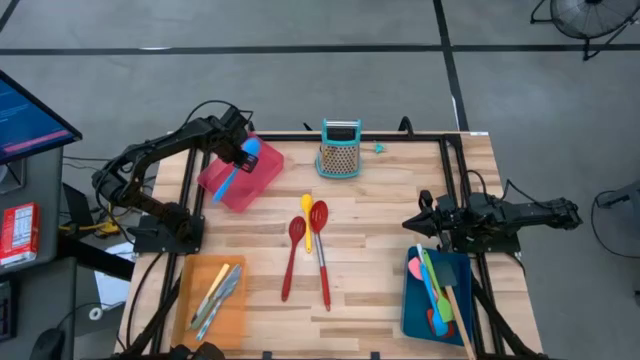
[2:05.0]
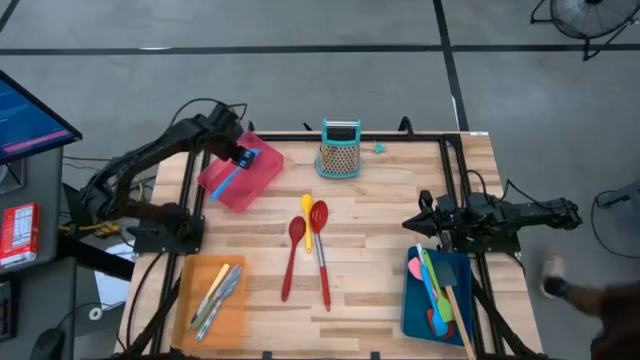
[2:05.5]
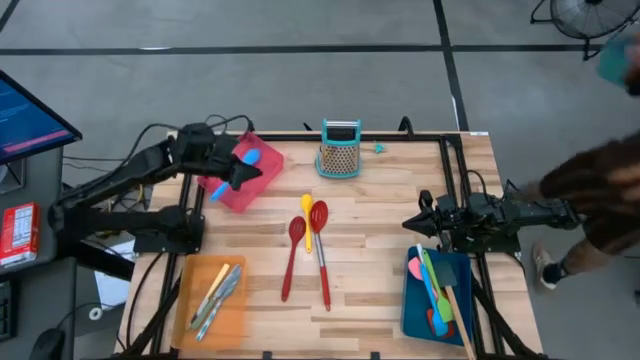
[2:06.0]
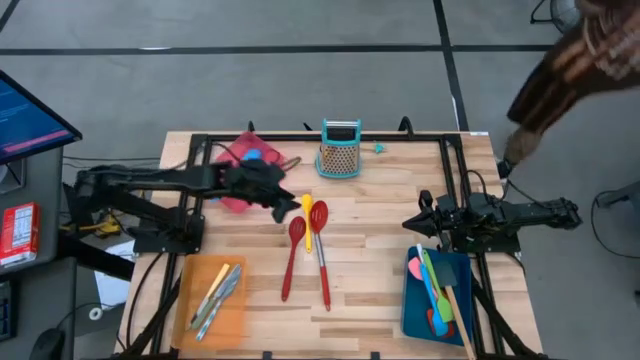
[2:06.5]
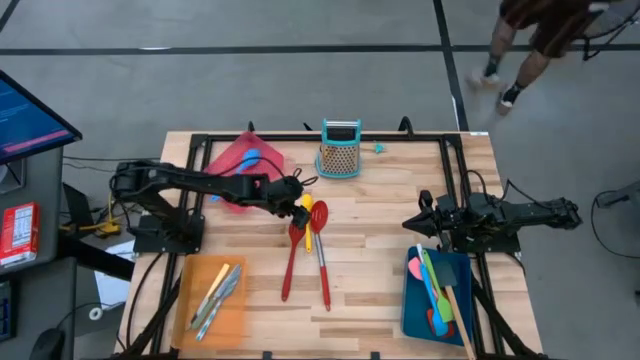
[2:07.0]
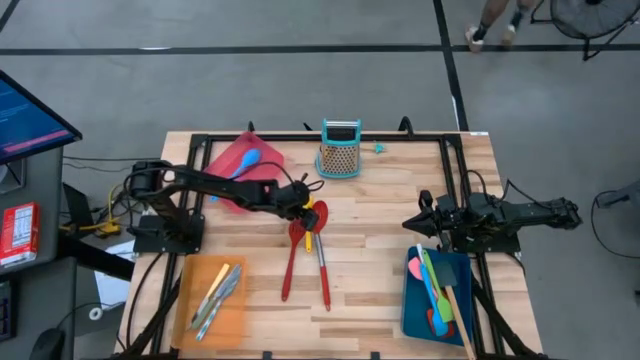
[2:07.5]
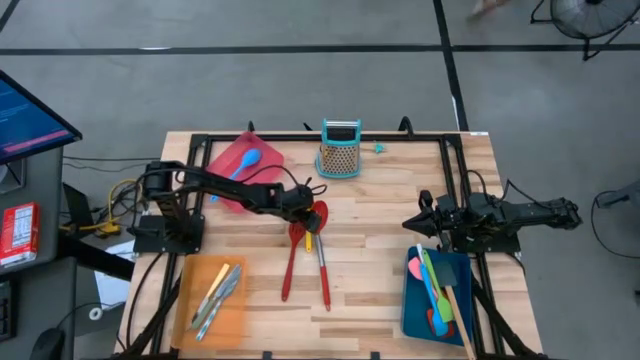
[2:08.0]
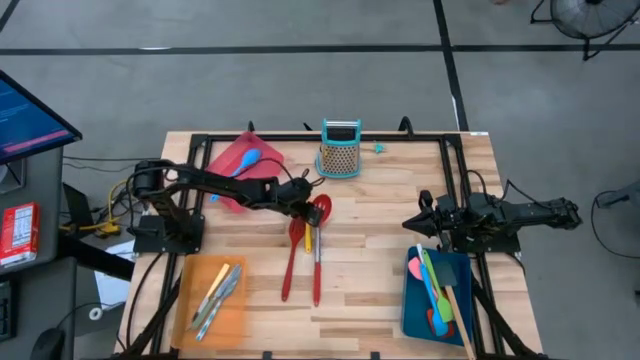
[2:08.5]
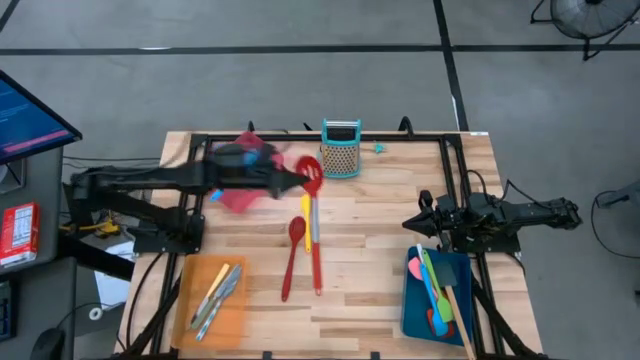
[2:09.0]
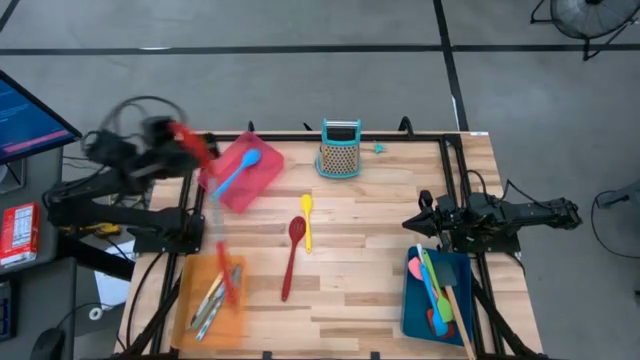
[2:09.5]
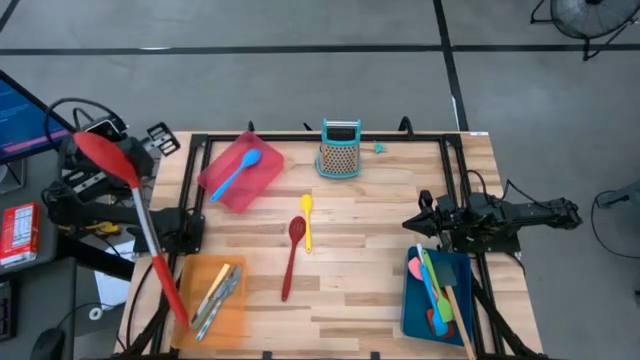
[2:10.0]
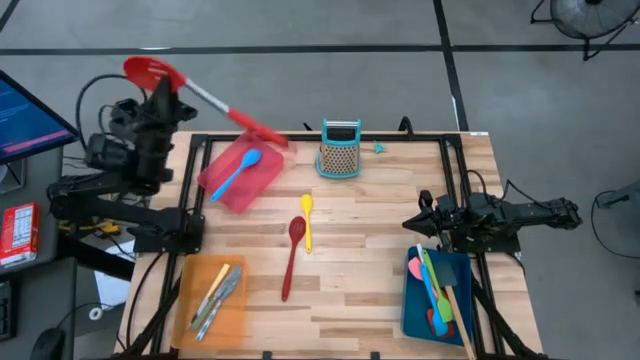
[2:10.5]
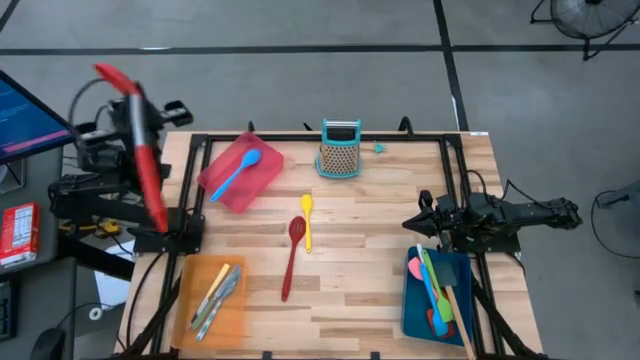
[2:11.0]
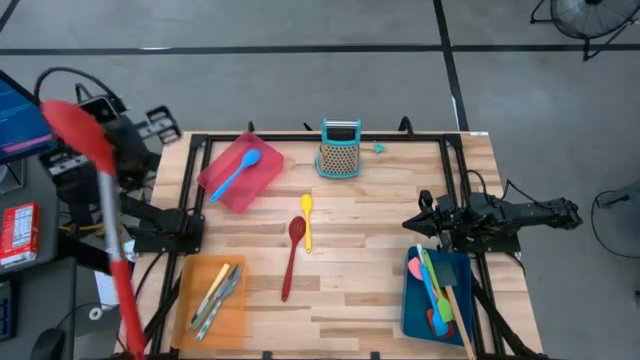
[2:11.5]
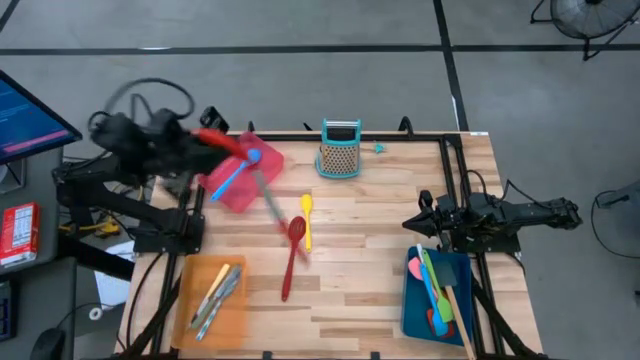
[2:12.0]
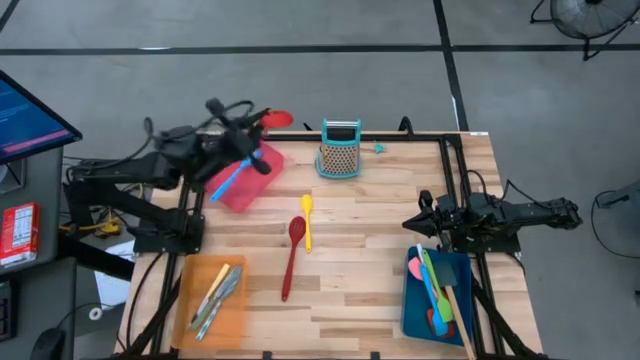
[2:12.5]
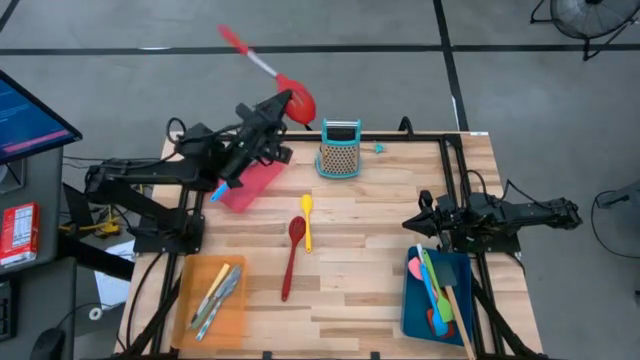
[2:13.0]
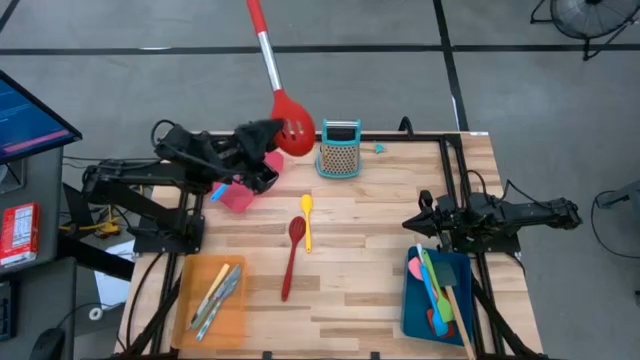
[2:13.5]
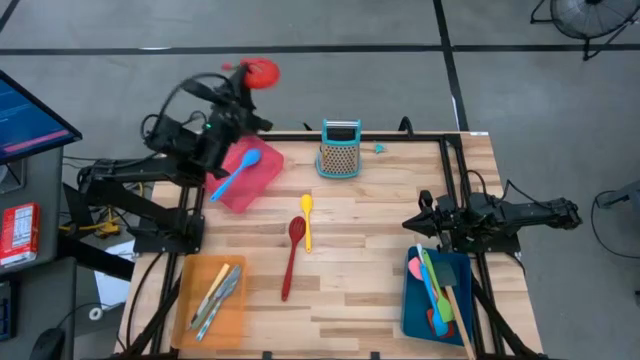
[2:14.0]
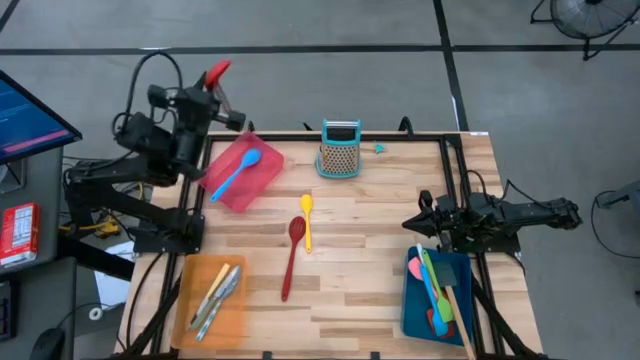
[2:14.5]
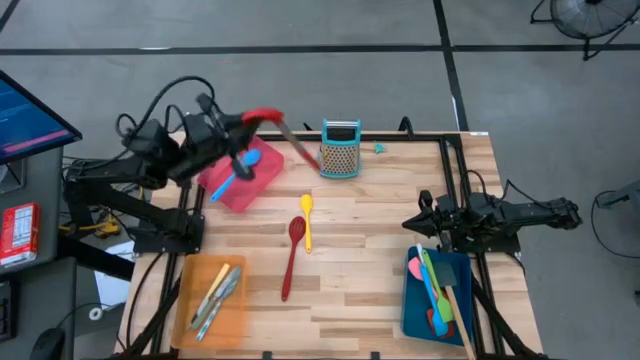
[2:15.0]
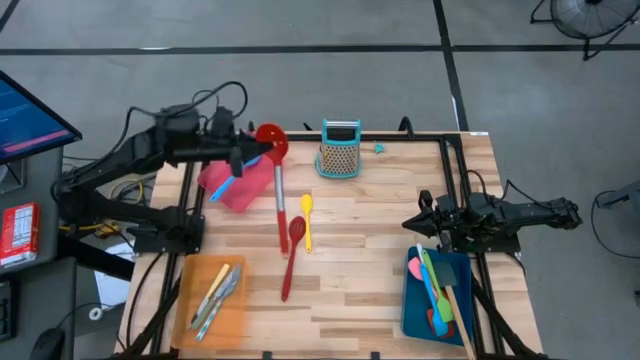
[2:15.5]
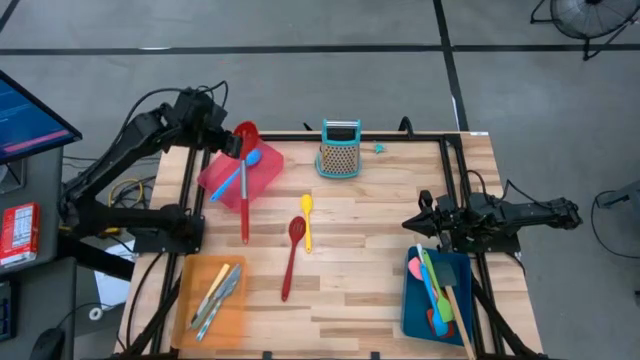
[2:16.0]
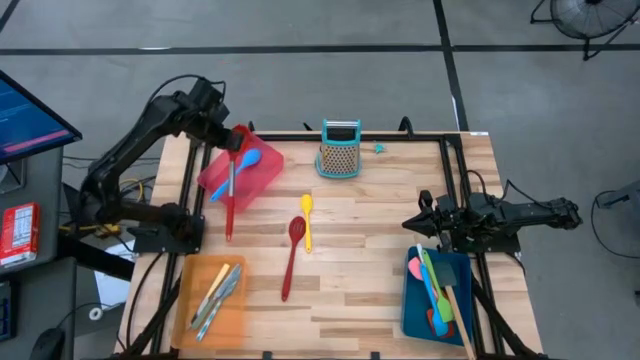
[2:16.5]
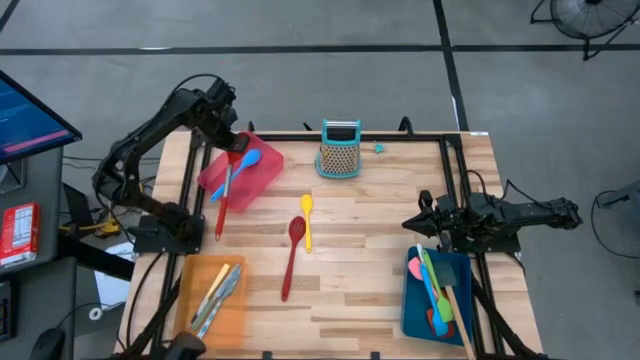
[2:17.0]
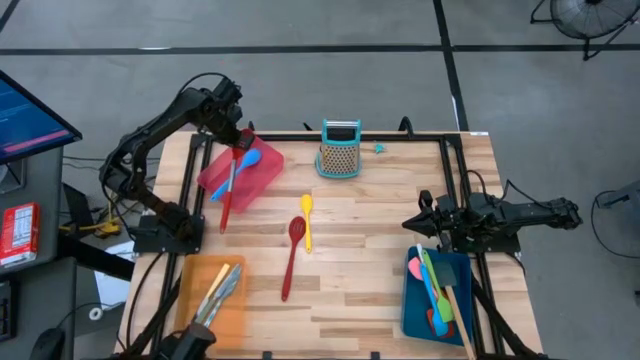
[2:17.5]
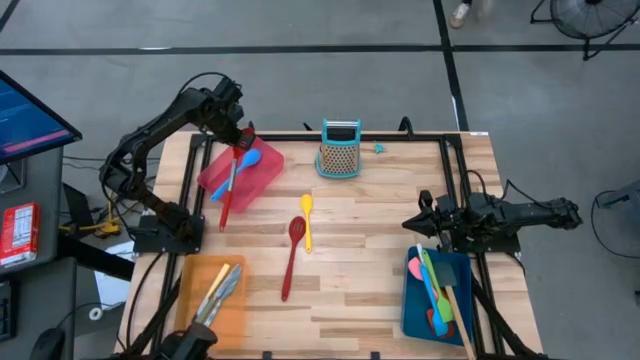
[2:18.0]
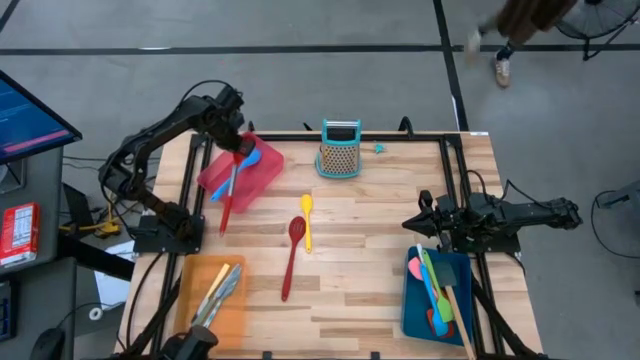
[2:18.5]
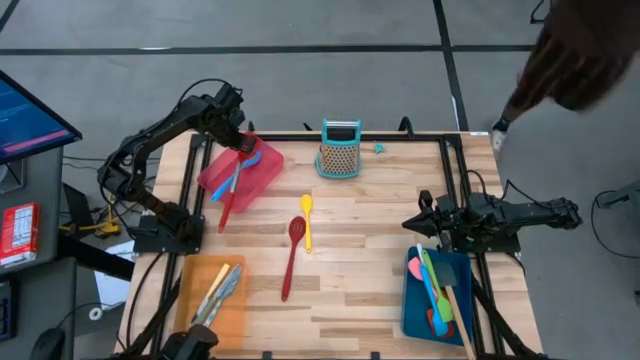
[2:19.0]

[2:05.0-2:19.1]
Task: Pick & Place Kitchen Items
Put the red silver slotted spoon into the red bin

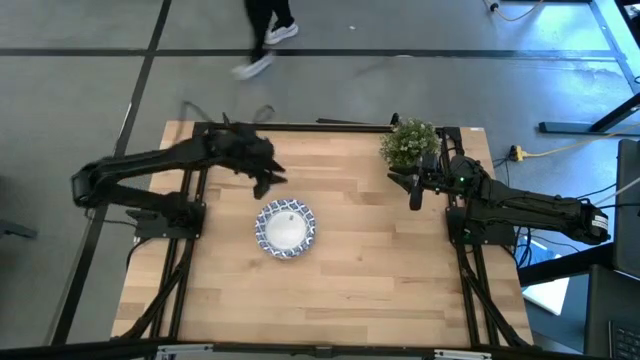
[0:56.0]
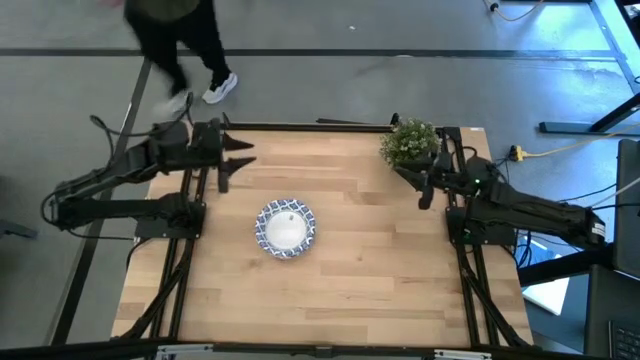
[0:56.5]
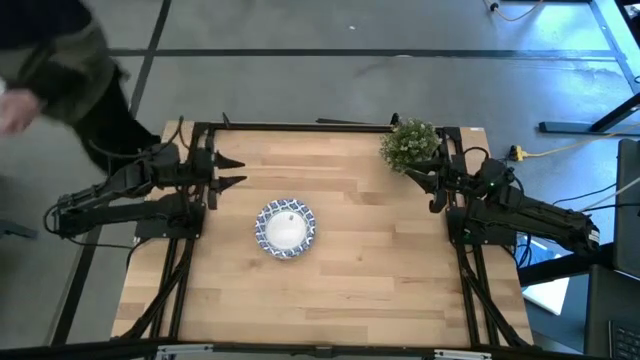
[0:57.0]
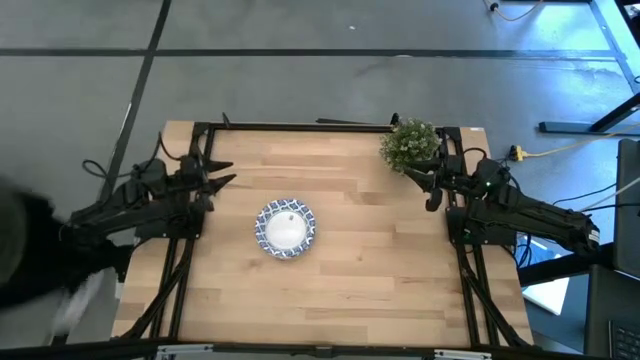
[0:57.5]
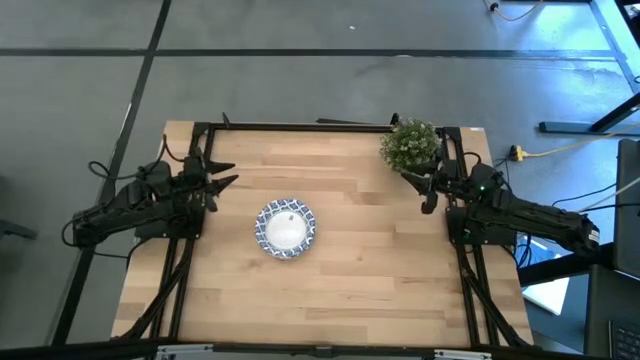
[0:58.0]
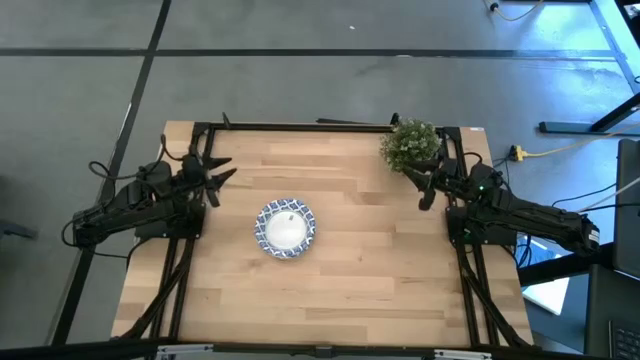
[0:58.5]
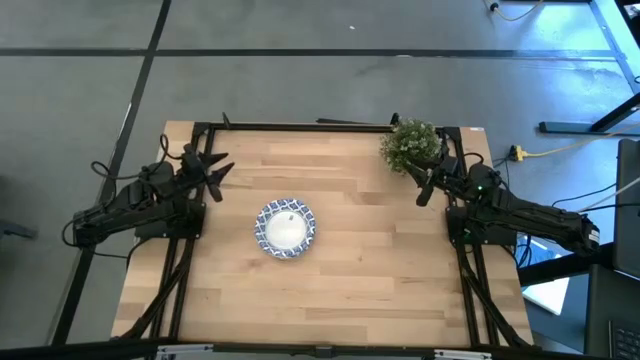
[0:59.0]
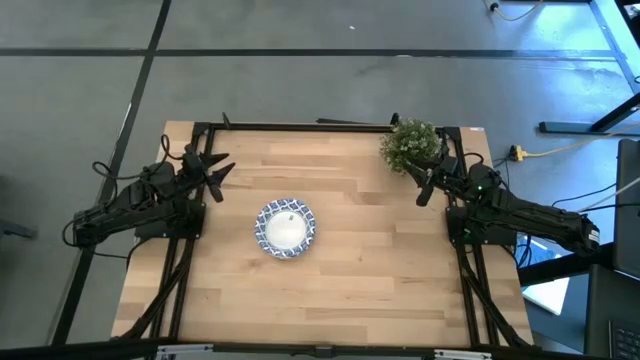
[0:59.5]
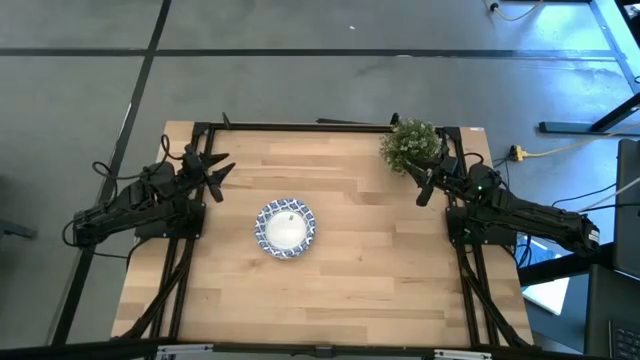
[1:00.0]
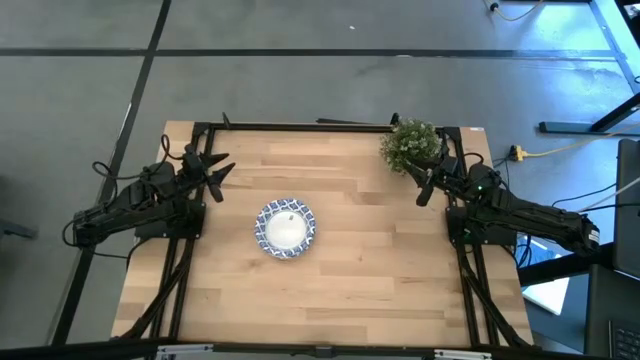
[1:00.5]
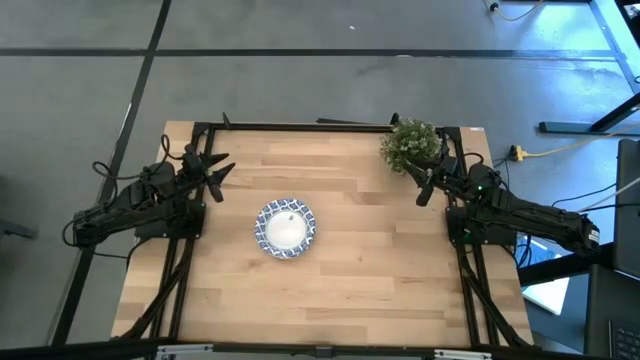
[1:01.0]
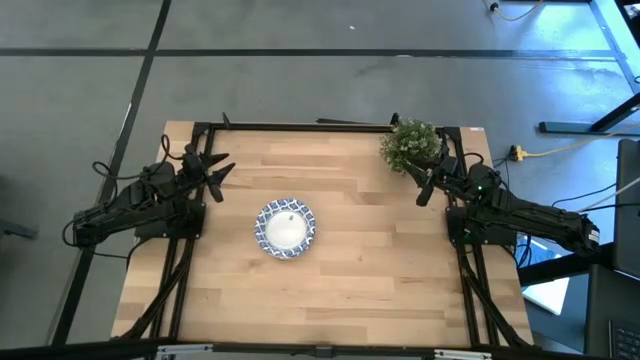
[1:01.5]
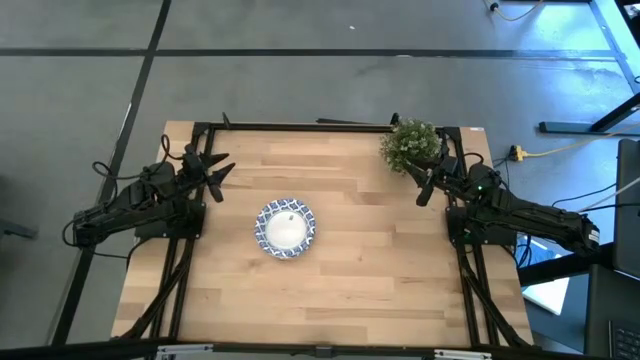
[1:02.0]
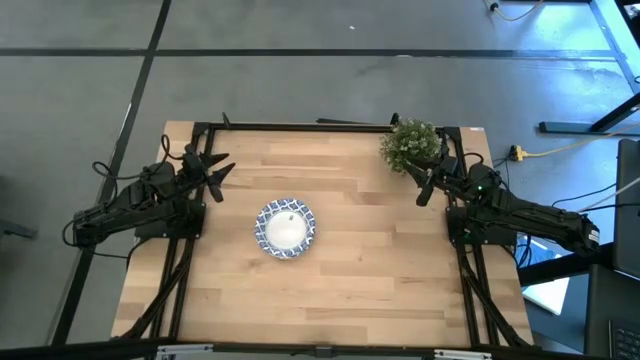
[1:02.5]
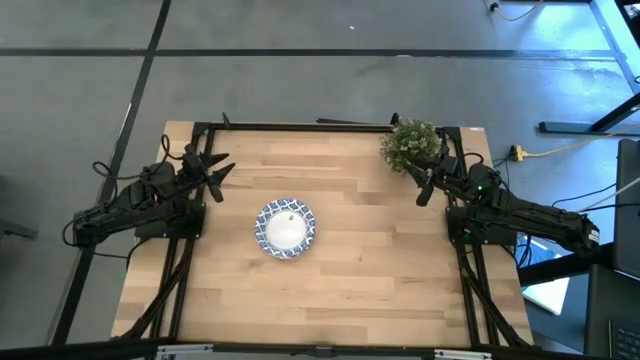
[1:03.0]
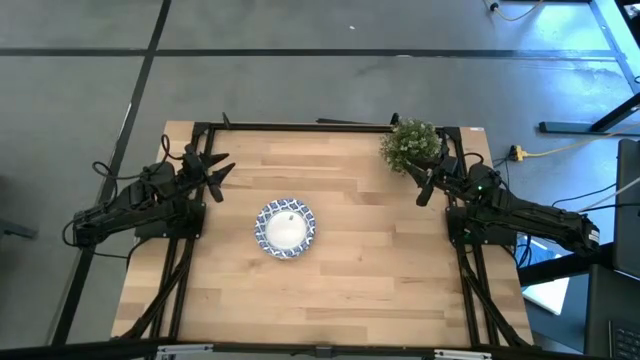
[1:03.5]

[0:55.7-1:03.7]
Task: Nest bowls inside each other
Return to Home Position
